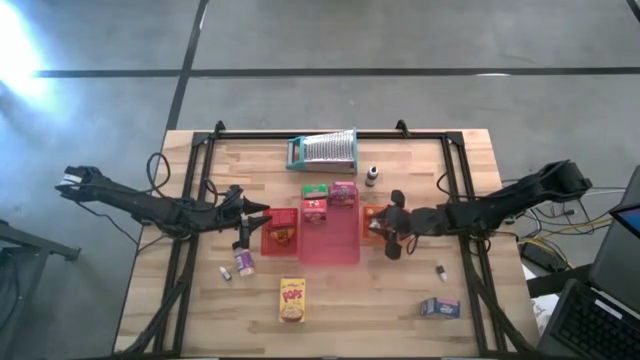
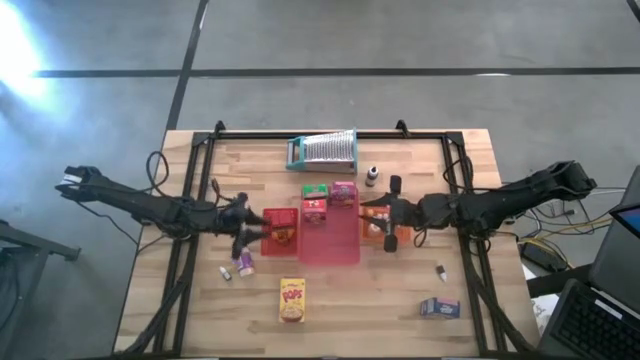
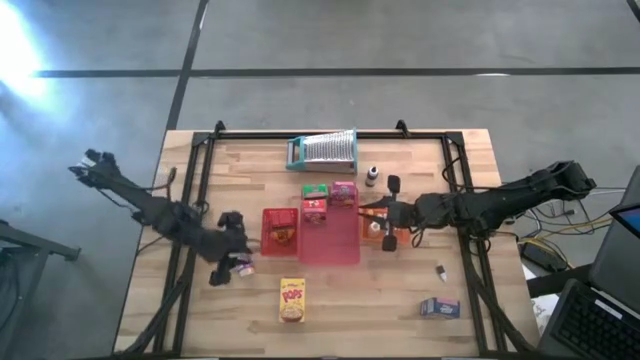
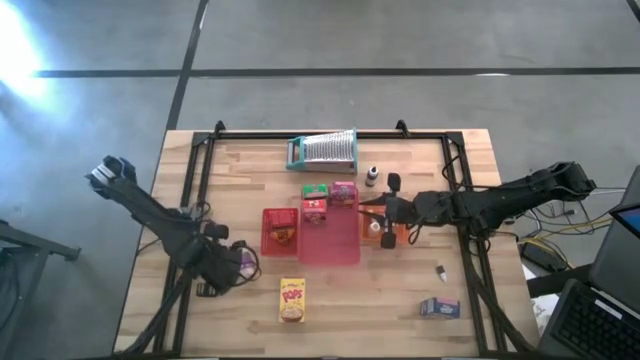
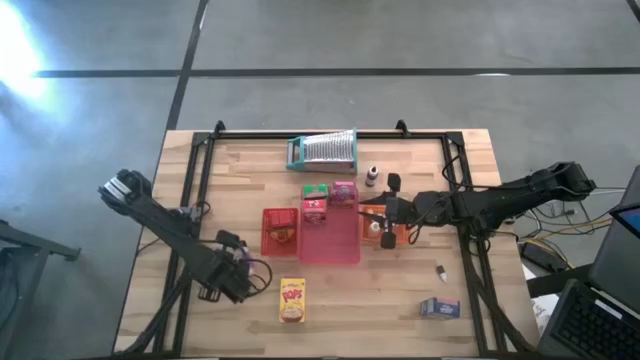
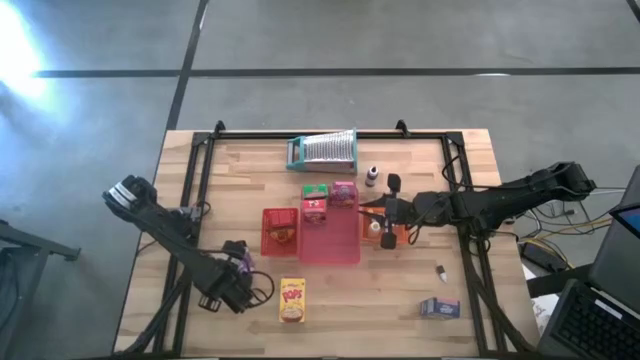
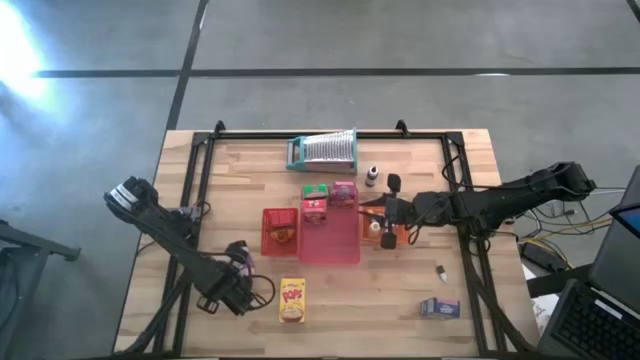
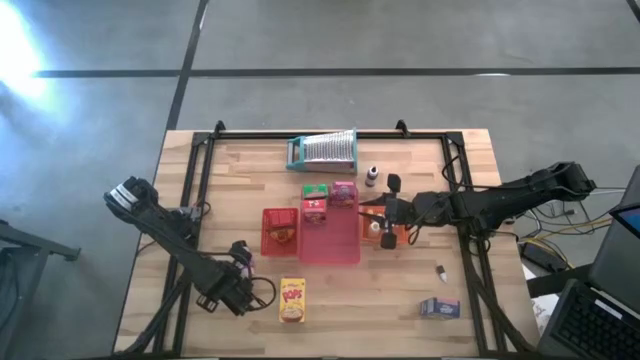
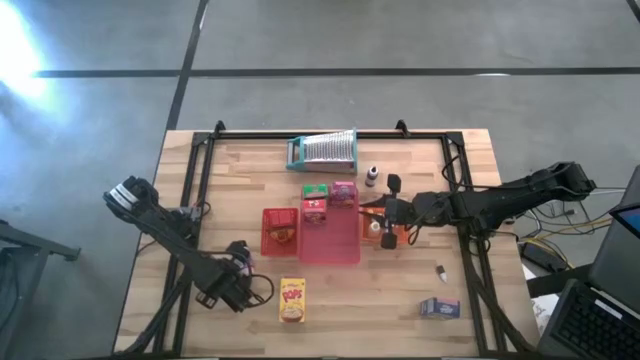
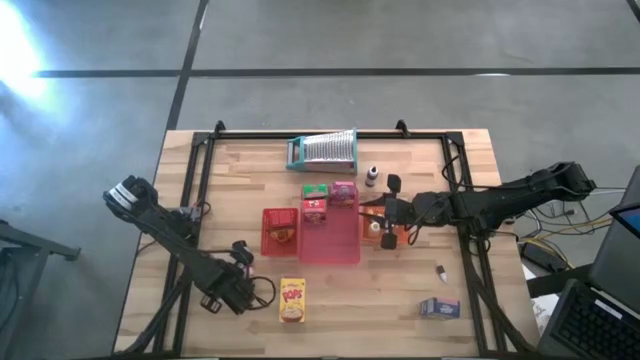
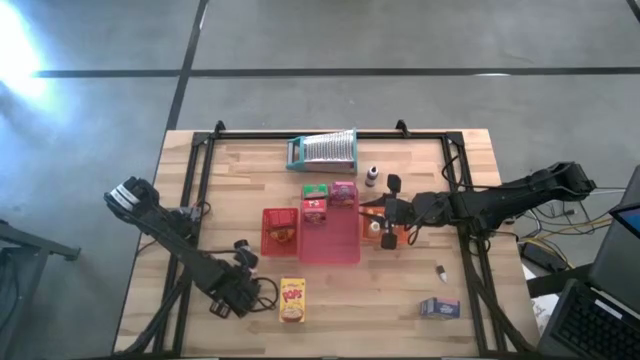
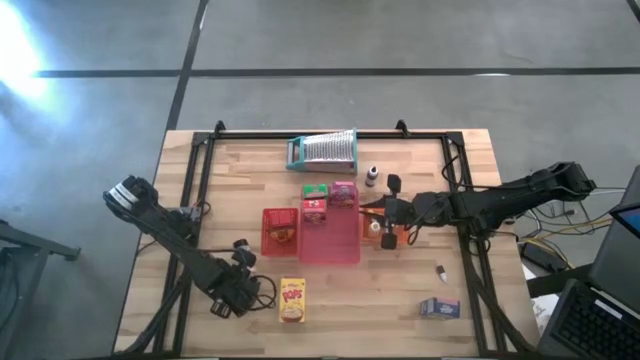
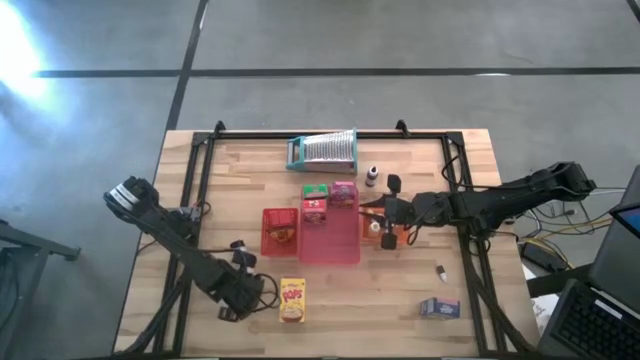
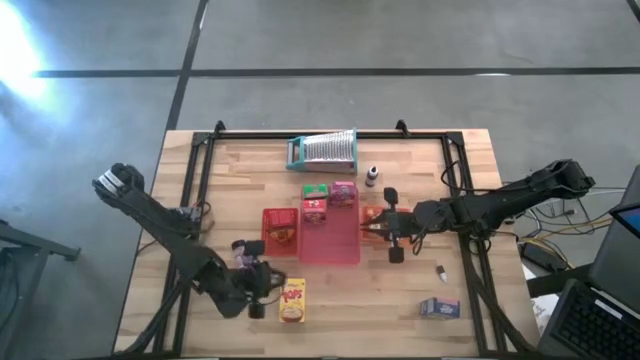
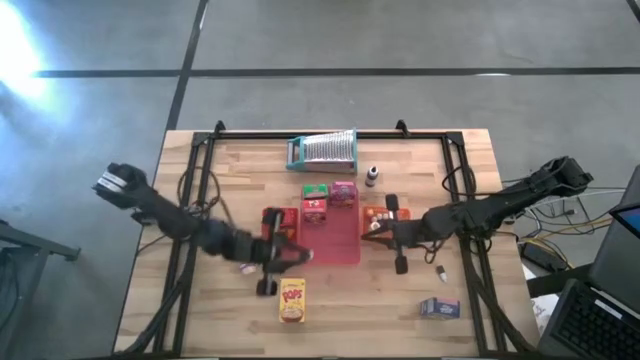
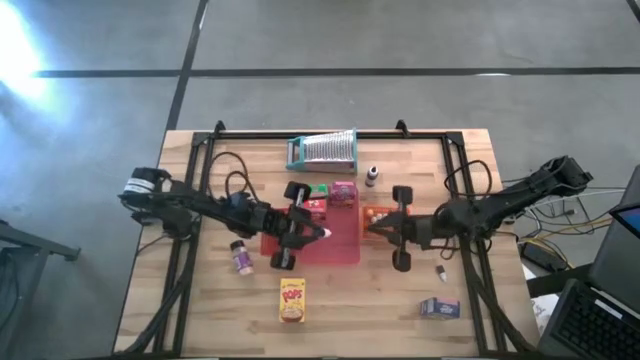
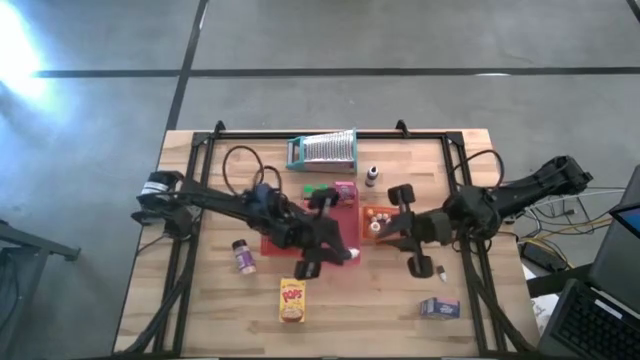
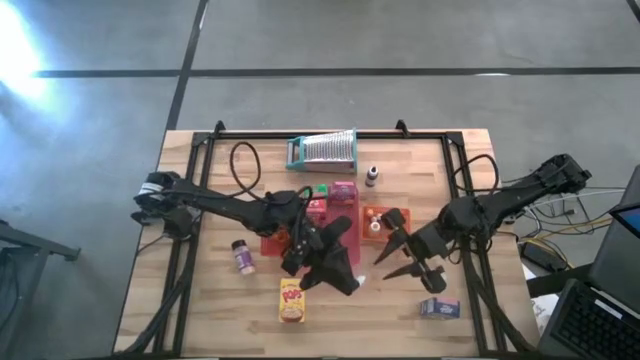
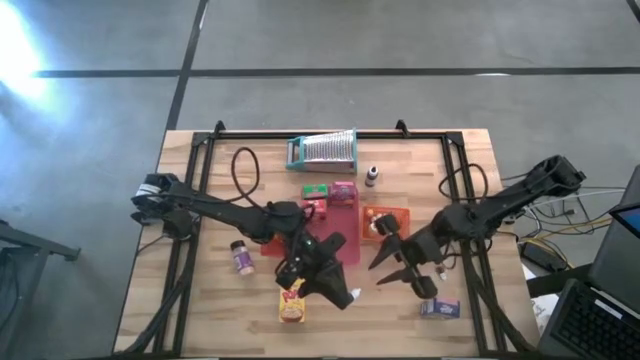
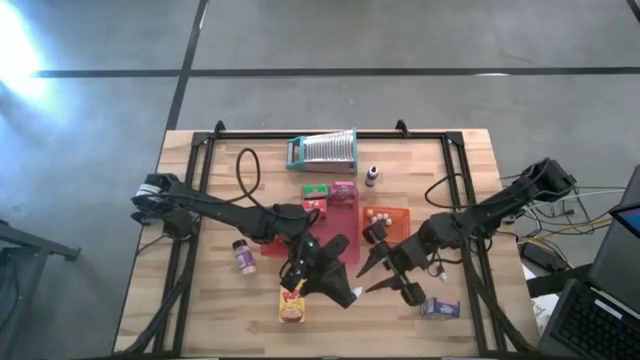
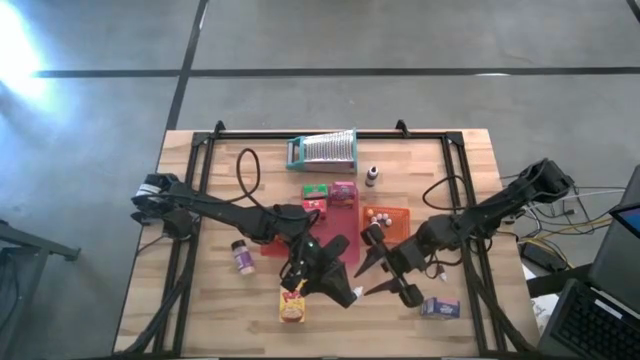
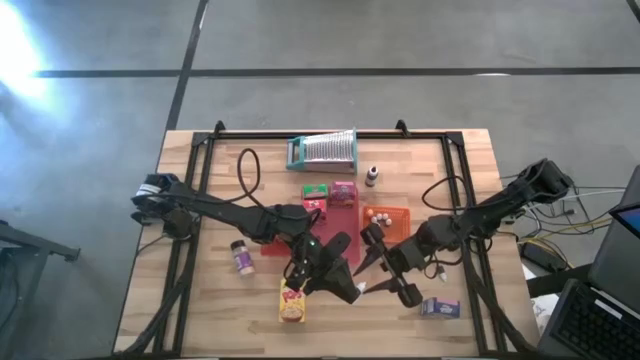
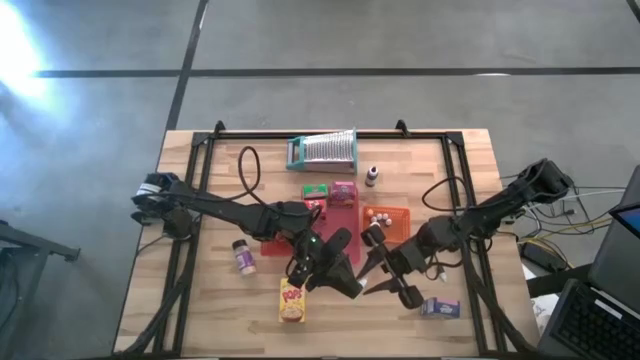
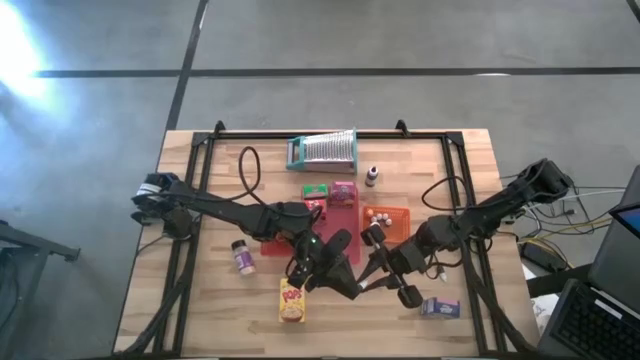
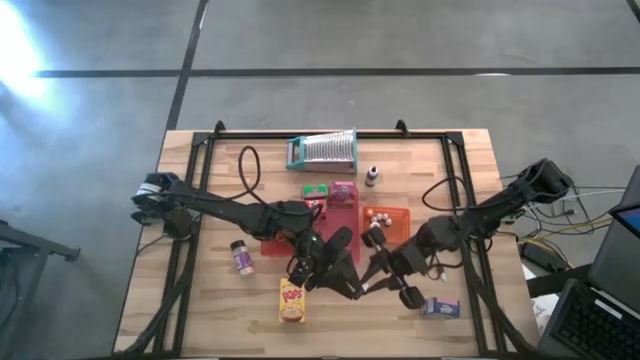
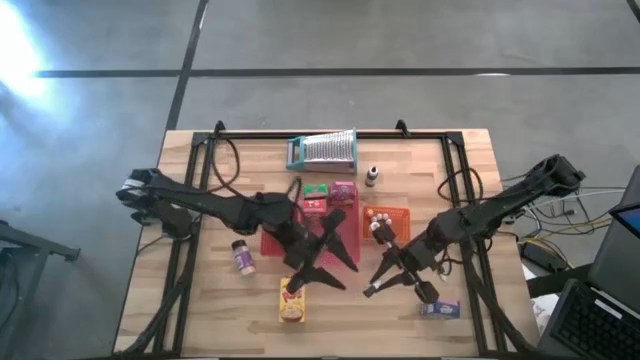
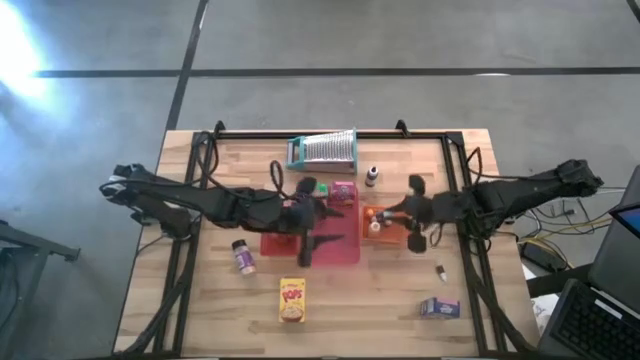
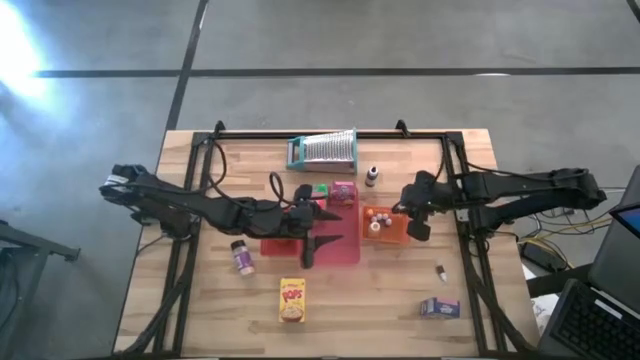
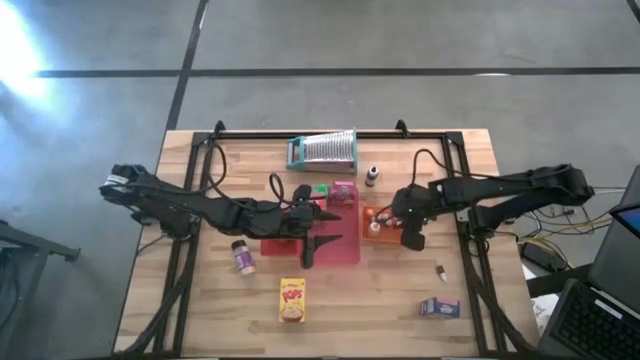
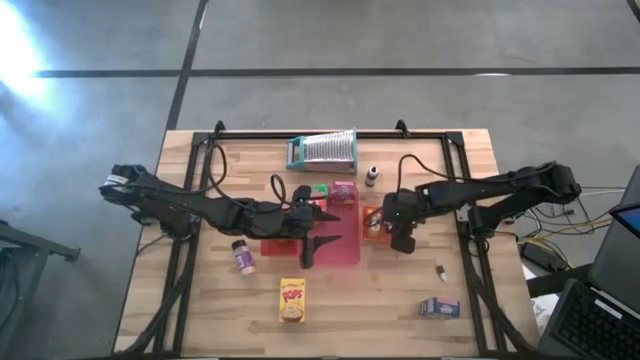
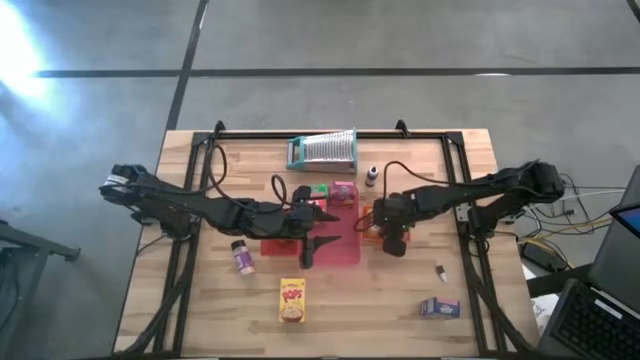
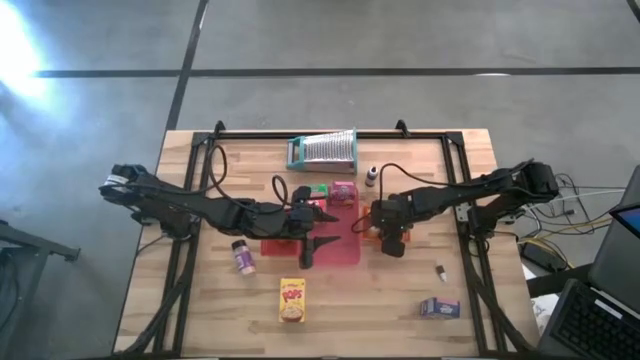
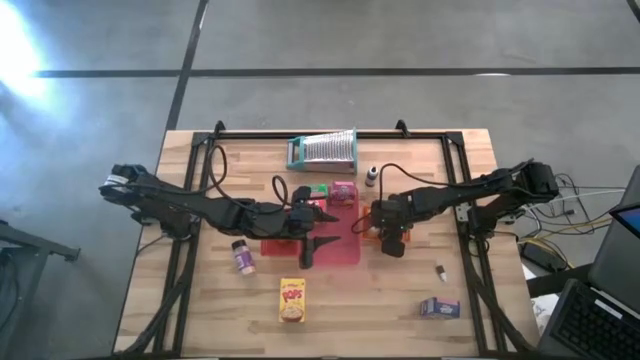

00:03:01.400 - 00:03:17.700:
Task: Pick & Place Kitchen Items
Put the small red food coloring bottle into the orange bin

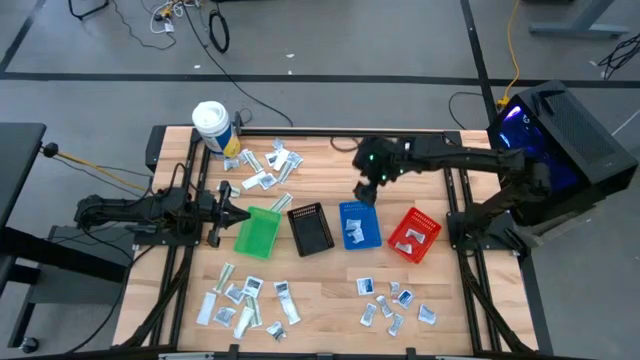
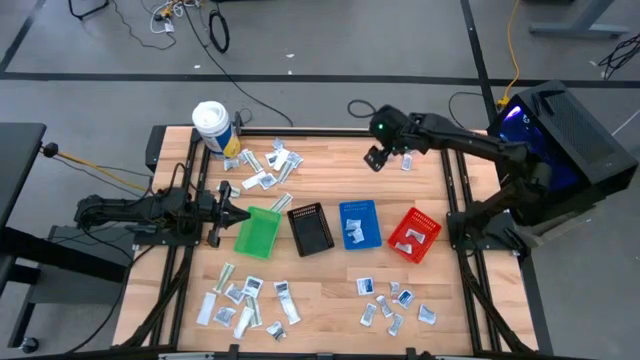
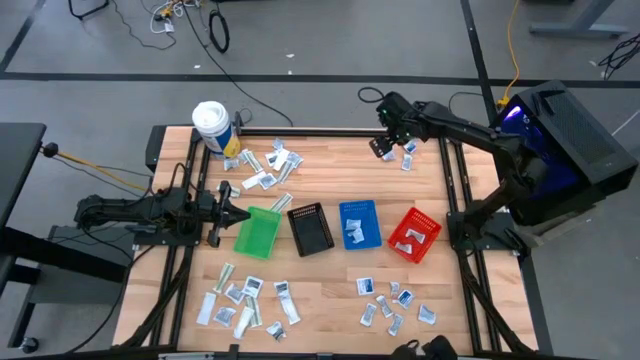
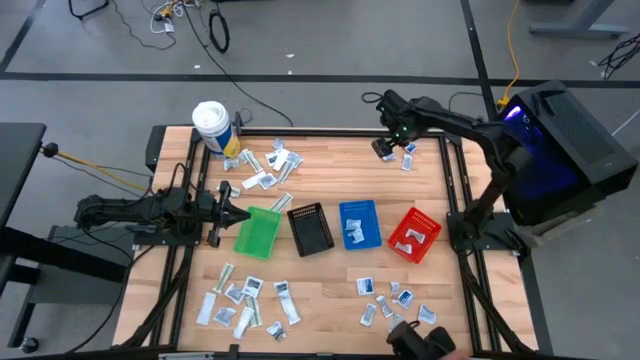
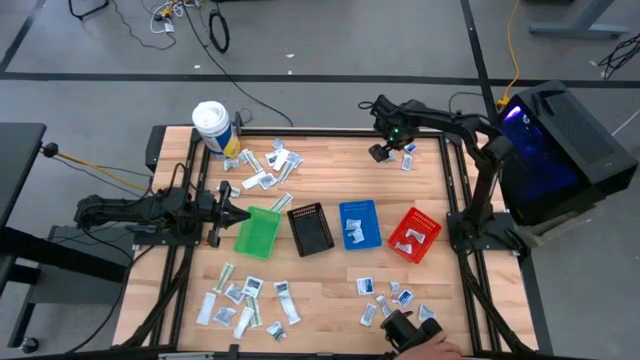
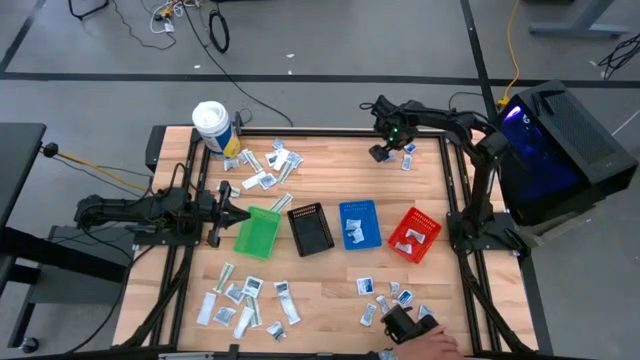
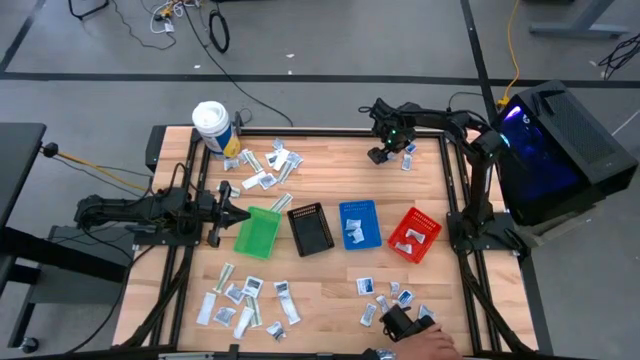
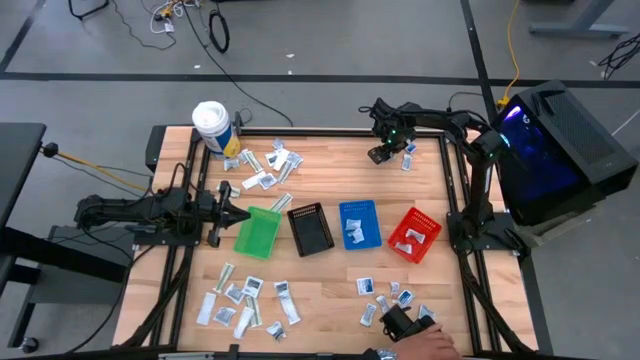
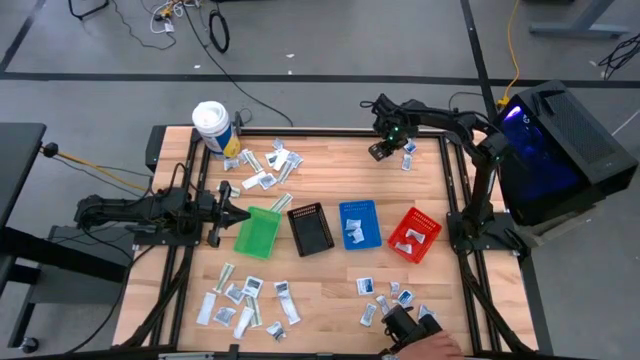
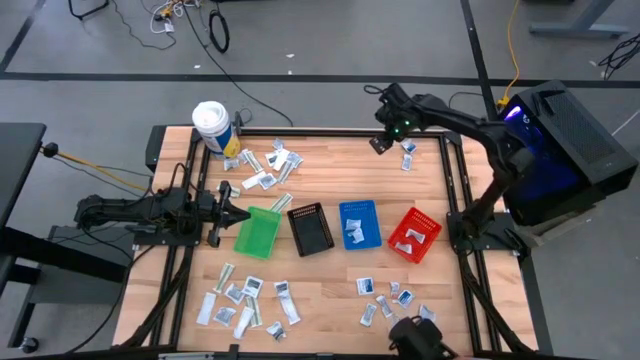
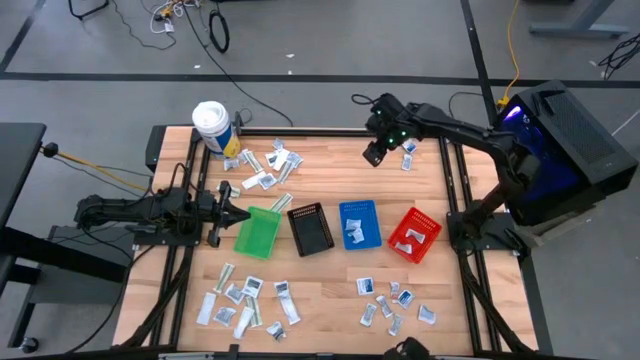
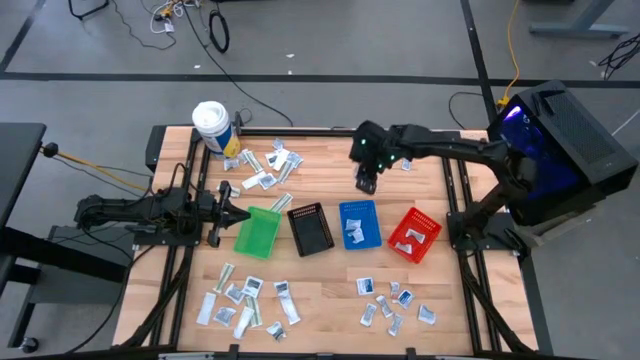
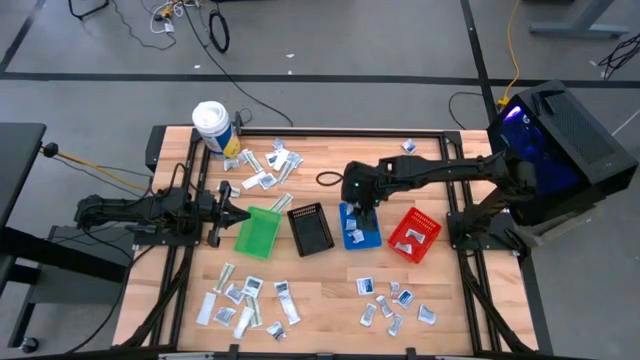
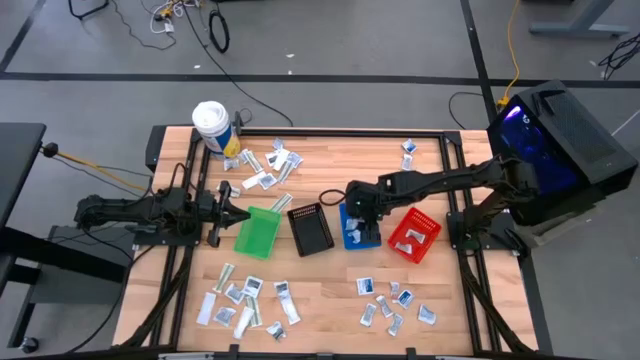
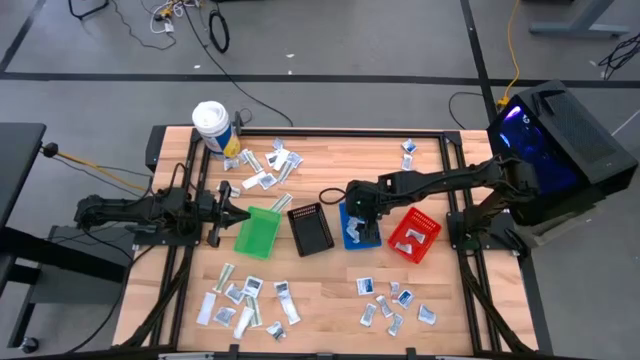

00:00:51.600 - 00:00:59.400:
Task: Pick & Place First Aid Supplies
Put the alcohol pad into the blue basket
